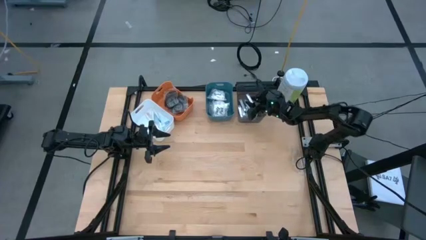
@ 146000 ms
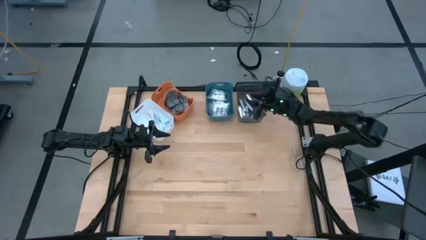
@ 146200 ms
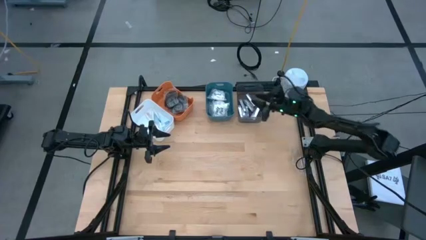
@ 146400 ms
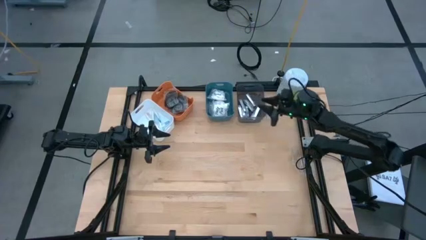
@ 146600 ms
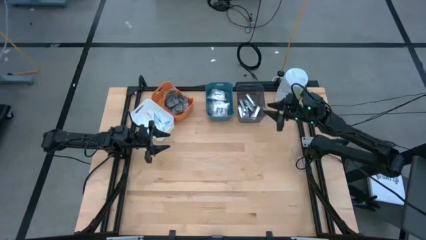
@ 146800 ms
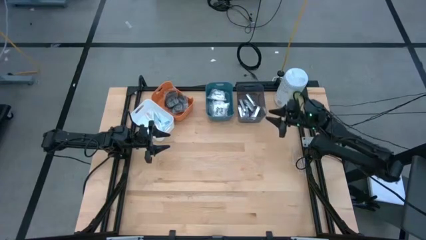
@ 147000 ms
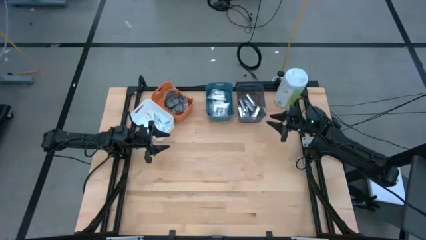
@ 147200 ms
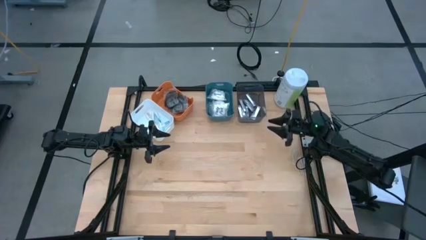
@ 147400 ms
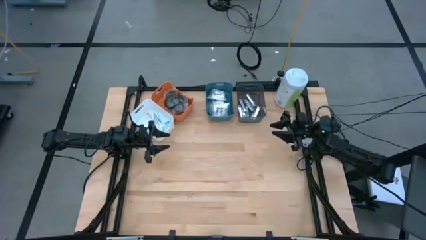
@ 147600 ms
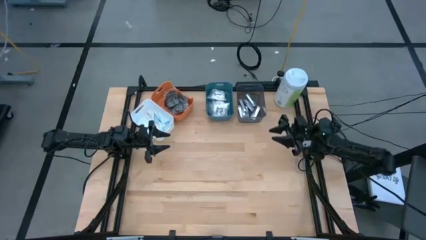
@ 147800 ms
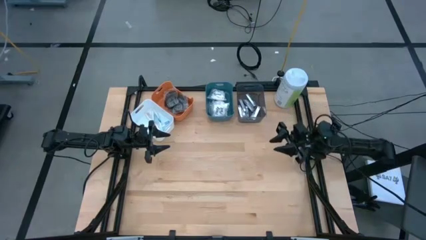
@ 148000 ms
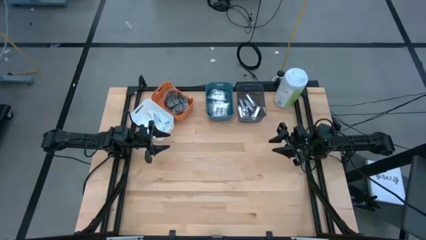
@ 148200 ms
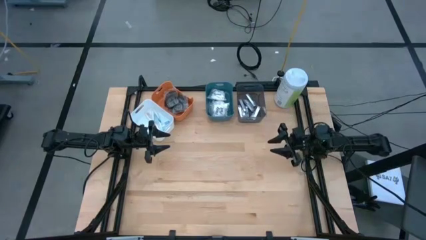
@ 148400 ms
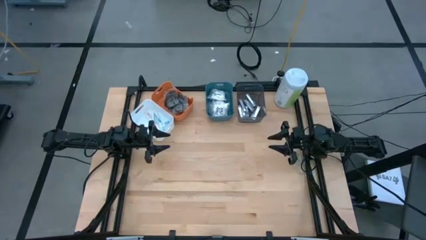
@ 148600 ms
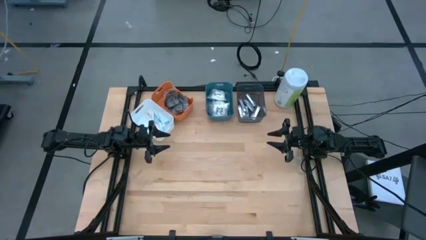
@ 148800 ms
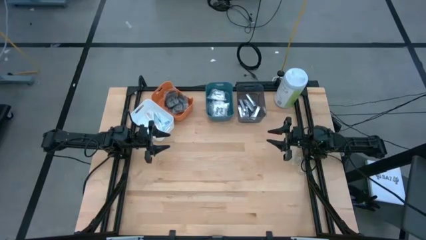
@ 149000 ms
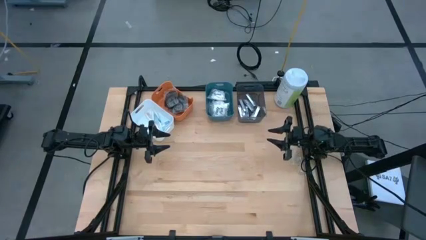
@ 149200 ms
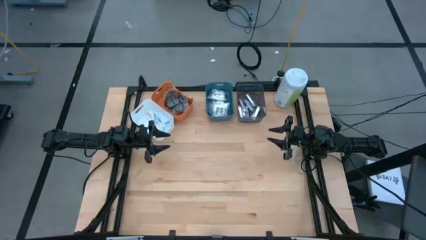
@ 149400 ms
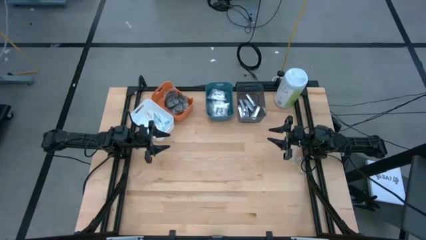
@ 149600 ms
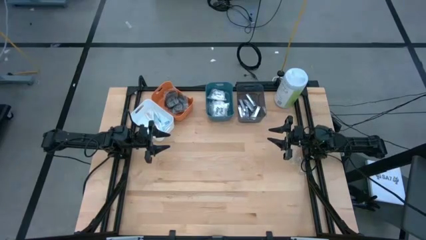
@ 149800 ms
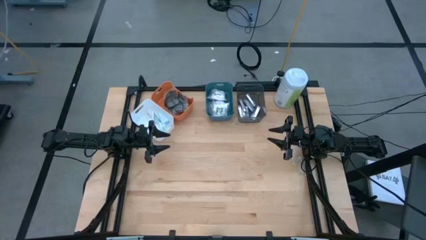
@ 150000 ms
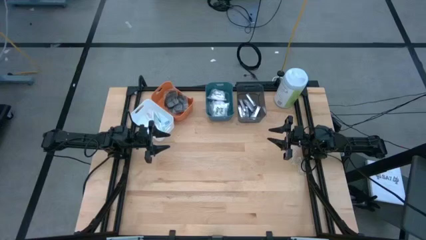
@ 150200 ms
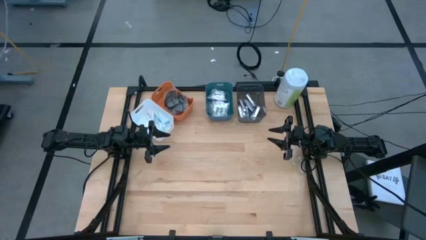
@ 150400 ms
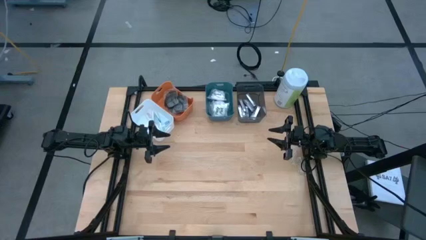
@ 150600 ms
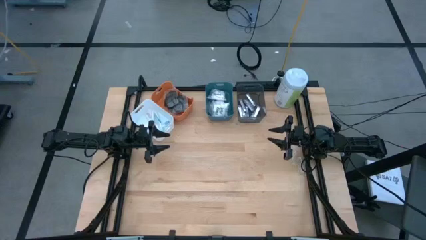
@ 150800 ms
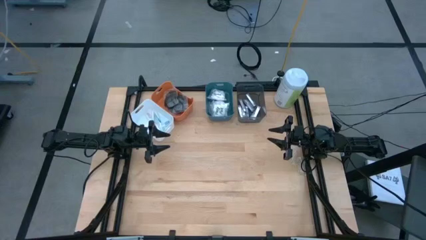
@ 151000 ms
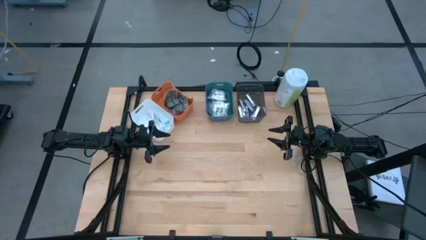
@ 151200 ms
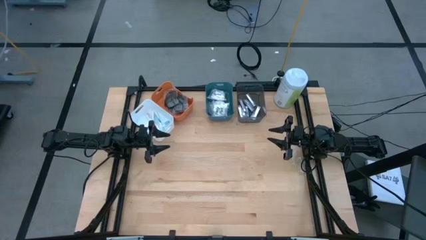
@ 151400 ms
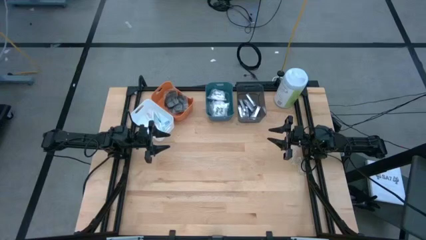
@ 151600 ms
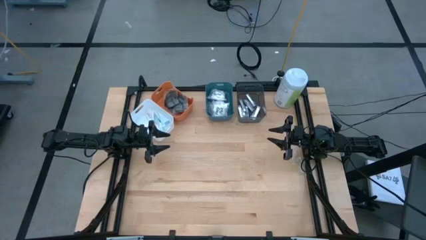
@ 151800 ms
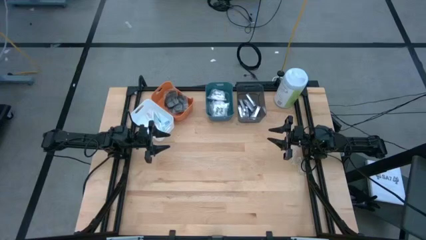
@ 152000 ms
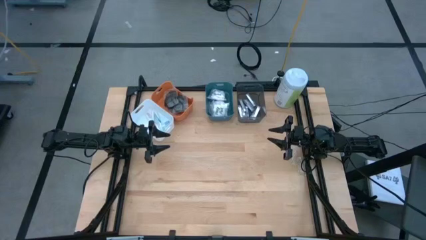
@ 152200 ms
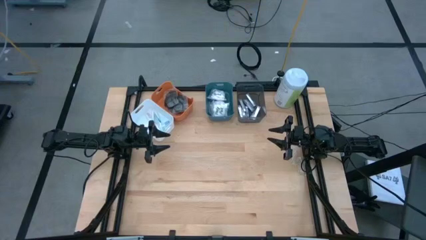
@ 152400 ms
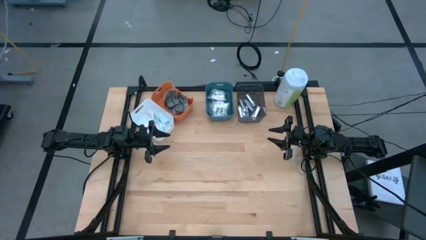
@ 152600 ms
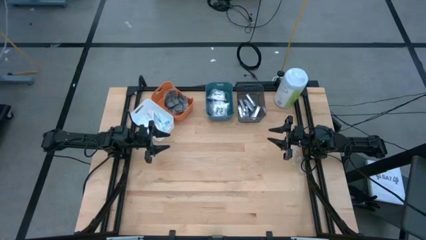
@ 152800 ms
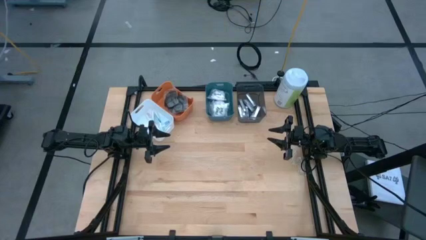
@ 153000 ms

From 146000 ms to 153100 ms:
Task: Pick & Place Travel size toiletries
Return to Home Position

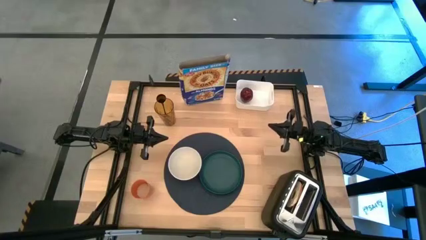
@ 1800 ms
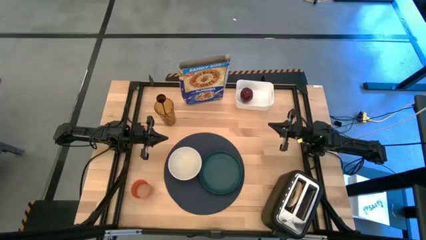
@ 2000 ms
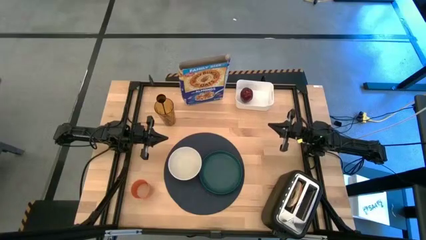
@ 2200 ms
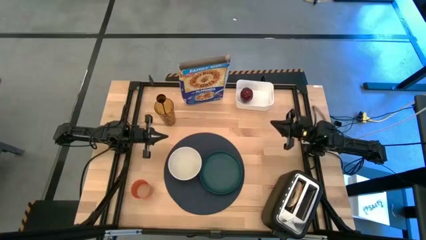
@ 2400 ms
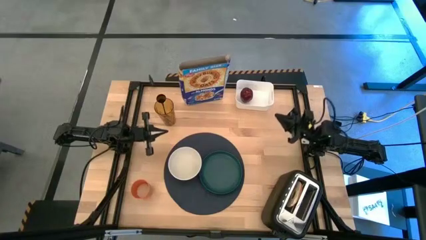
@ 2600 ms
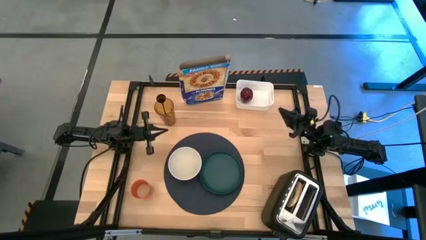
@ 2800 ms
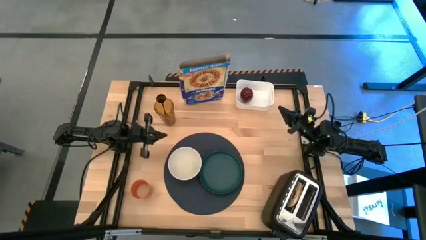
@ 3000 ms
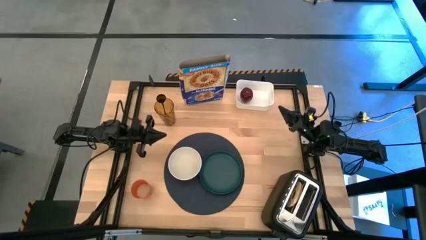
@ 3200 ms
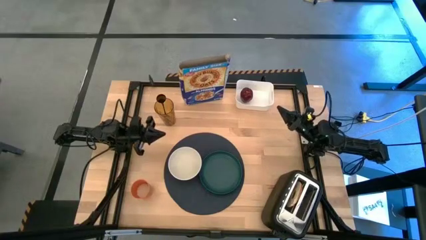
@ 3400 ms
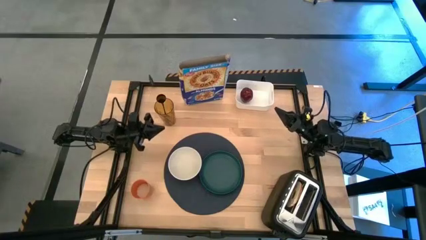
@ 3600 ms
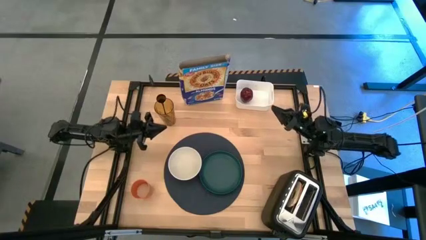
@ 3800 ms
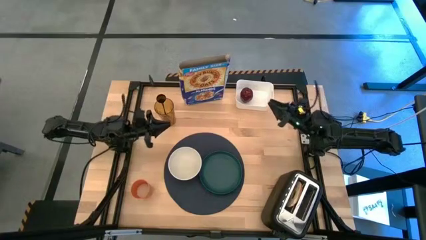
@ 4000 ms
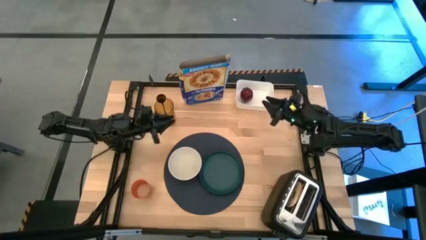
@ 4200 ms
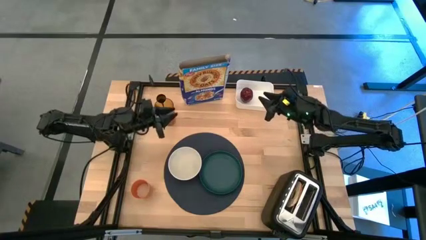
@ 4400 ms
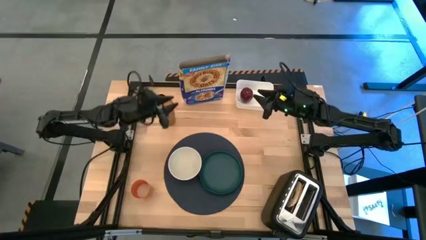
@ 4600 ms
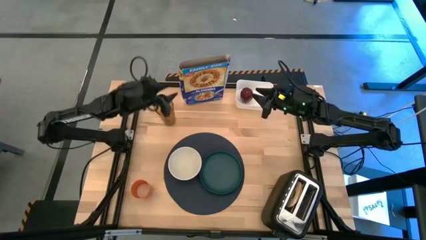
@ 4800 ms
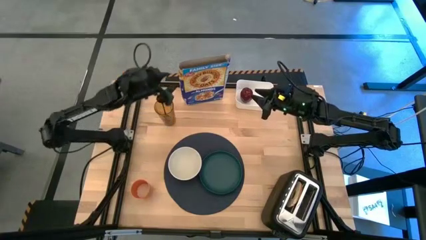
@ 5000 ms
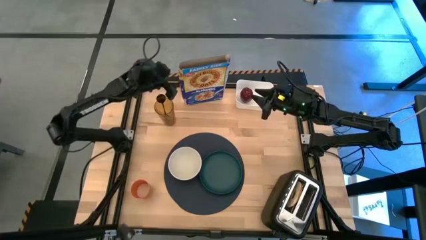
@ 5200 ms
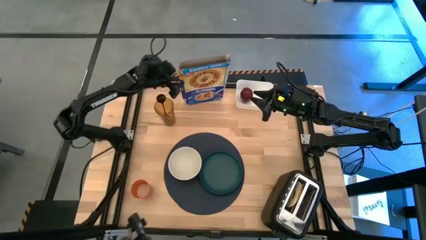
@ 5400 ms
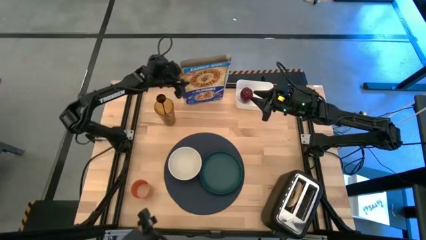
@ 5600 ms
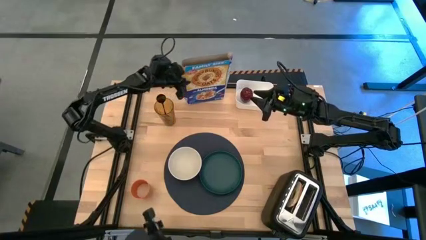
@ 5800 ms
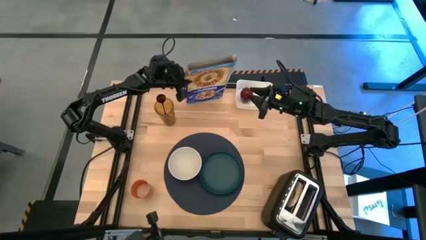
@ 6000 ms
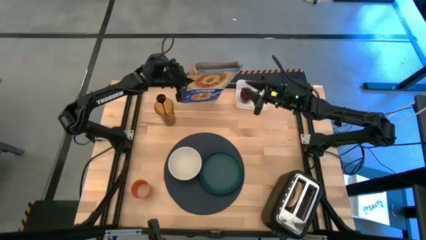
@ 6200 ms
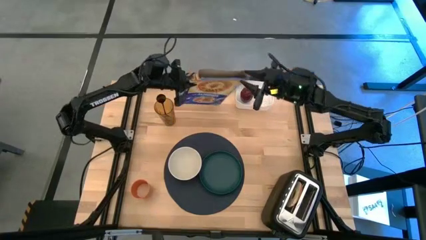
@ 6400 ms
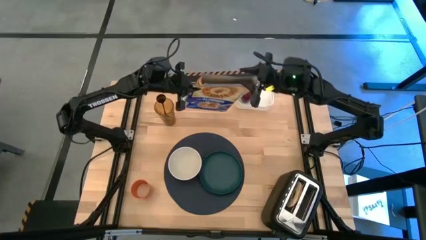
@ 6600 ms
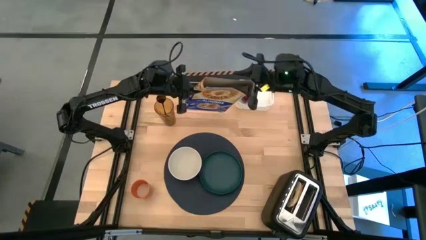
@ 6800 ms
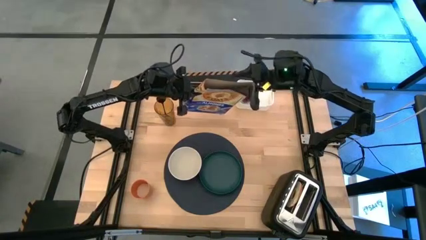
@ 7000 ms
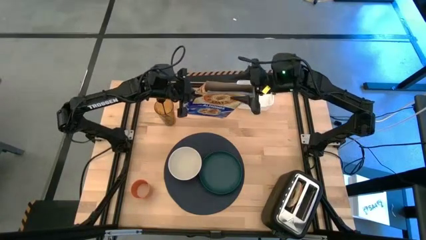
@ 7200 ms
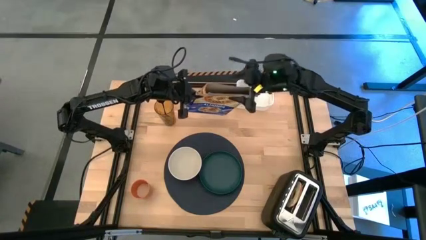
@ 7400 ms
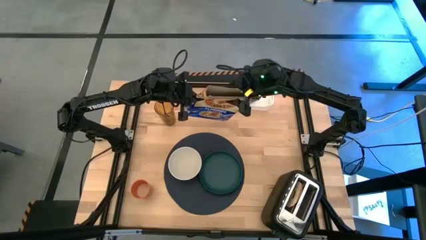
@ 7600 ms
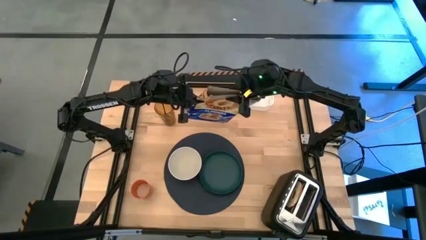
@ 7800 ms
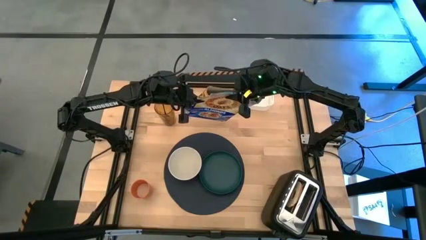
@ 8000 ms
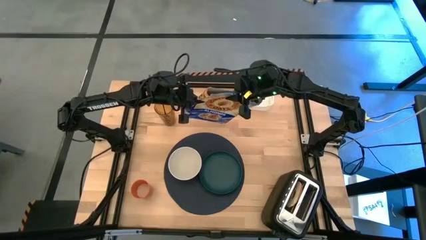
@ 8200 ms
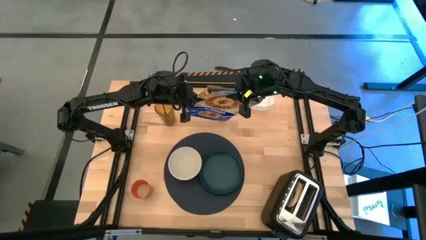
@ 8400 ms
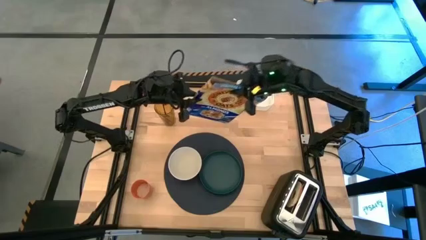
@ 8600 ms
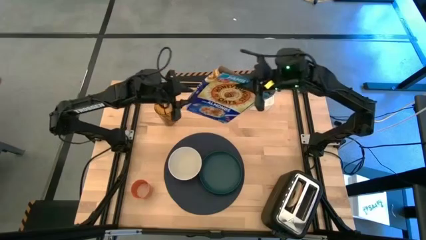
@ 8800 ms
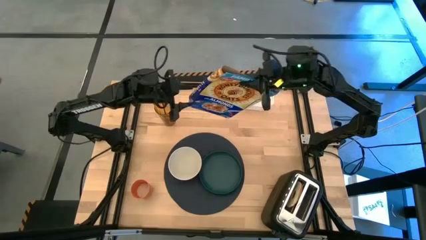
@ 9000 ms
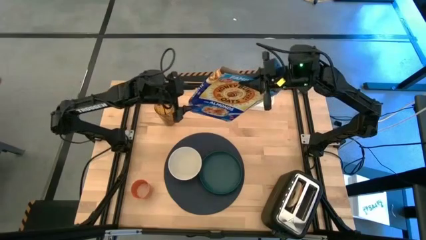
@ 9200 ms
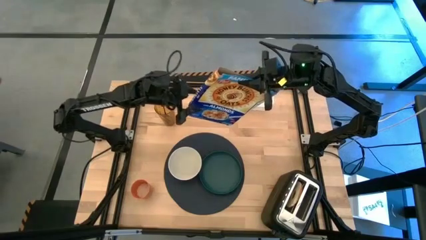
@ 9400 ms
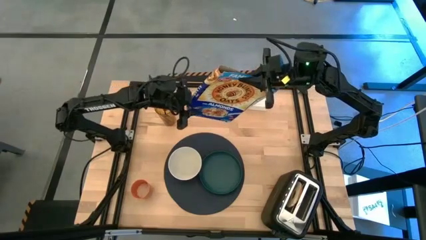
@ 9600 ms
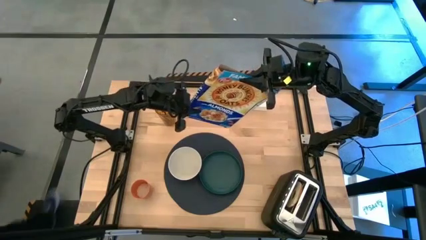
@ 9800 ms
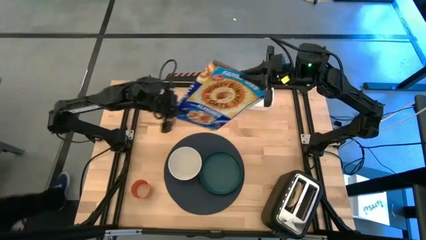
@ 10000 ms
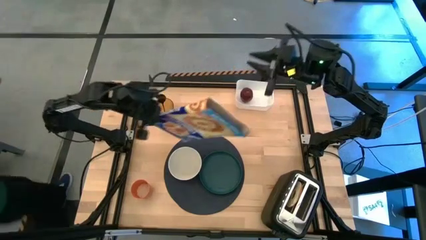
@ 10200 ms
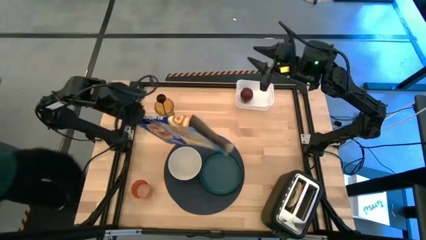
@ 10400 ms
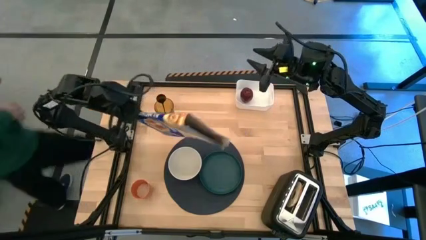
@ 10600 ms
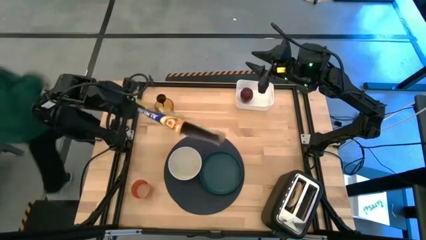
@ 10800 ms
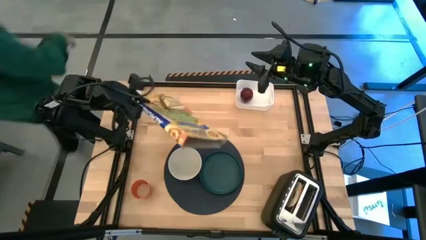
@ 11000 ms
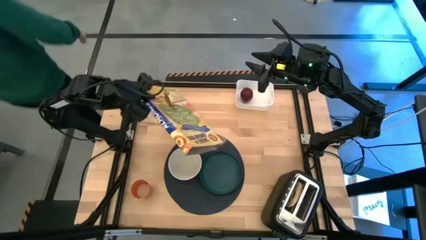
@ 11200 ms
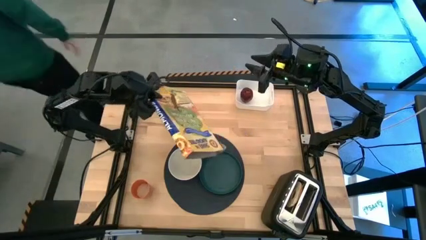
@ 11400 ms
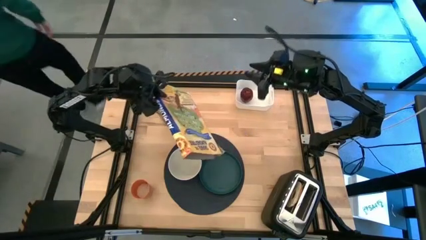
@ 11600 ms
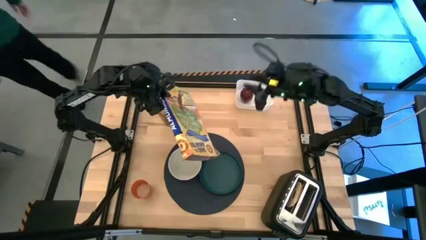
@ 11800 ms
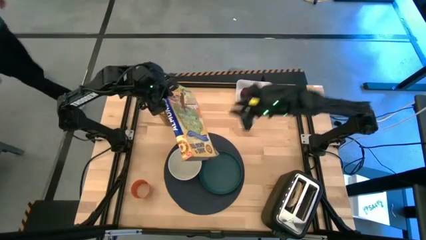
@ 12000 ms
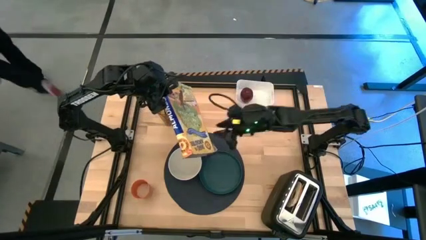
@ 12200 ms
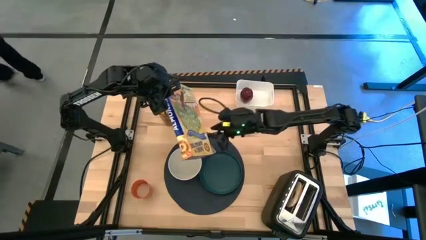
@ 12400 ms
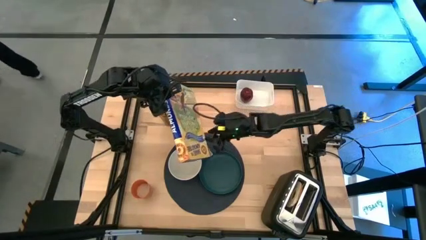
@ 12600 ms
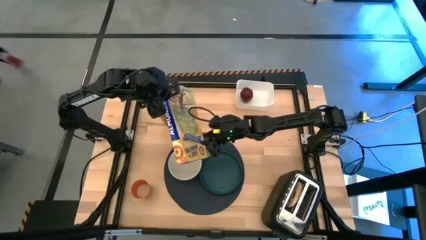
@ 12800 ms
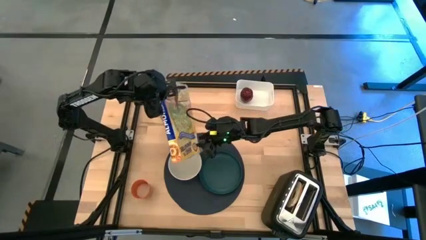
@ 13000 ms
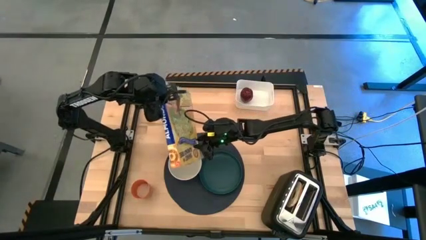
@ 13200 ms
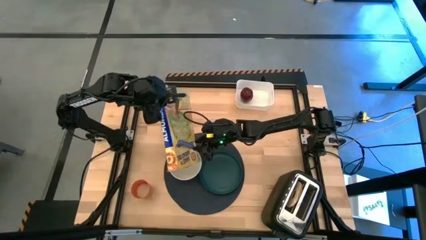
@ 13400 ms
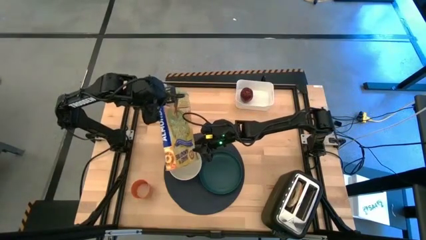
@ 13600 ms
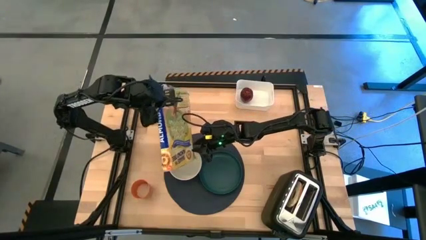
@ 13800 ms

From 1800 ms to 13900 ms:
Task: Arrange a breakfast setting
Pour the cereal from the blue cereal box into the white bowl
